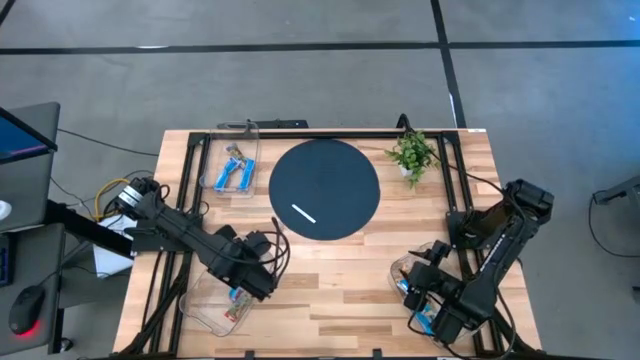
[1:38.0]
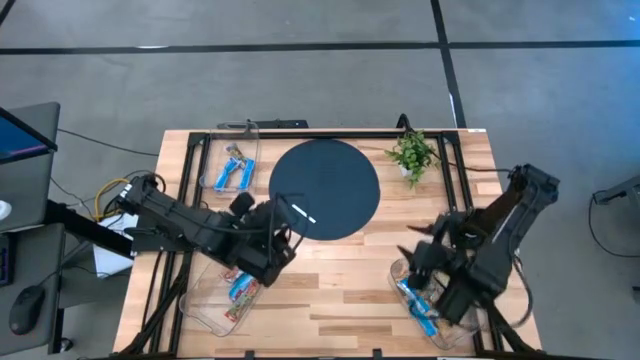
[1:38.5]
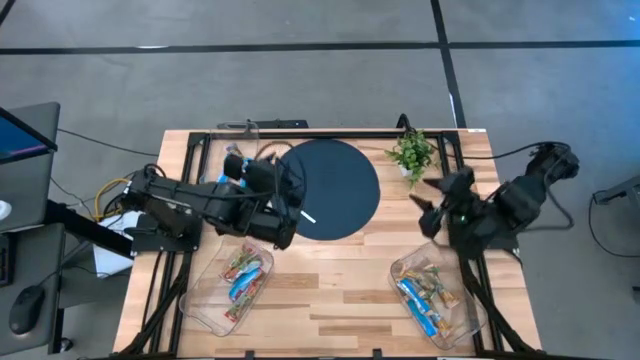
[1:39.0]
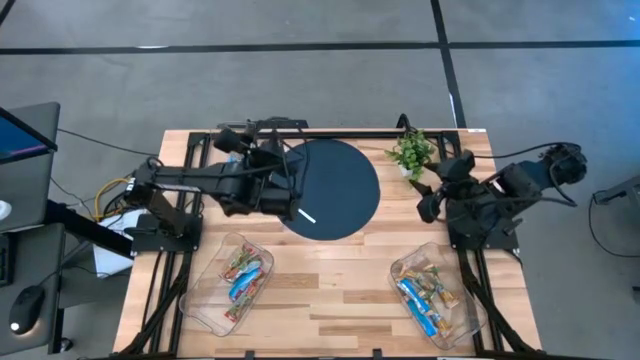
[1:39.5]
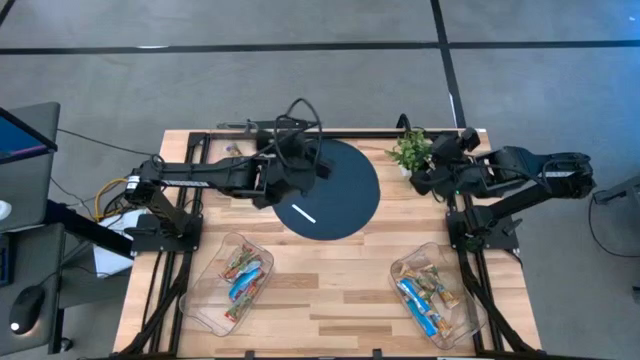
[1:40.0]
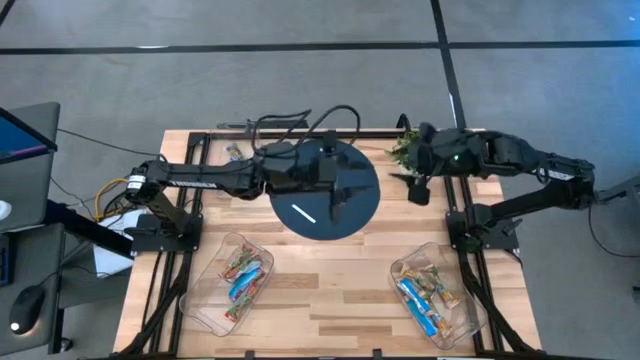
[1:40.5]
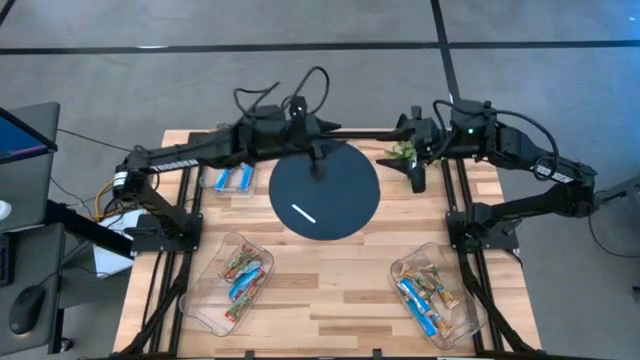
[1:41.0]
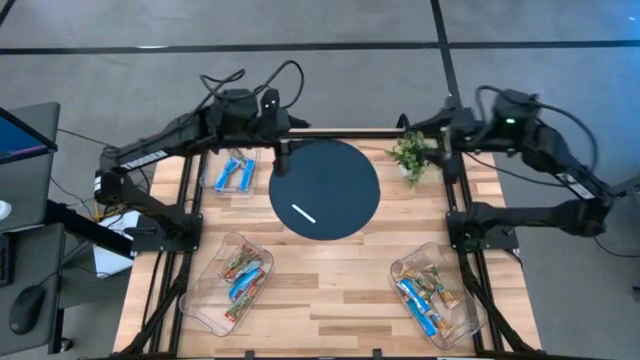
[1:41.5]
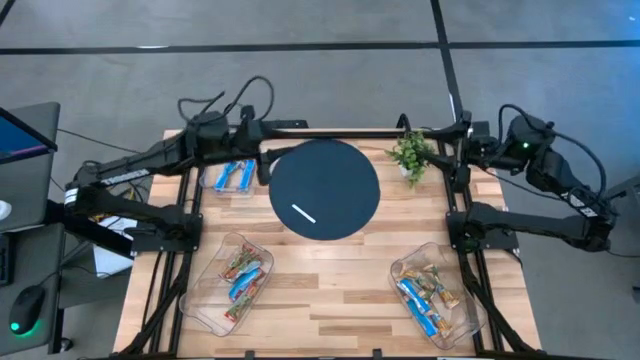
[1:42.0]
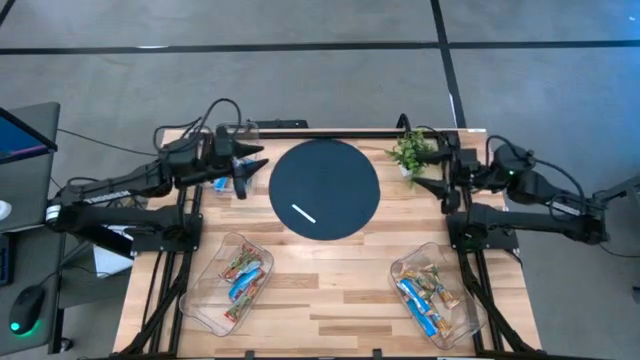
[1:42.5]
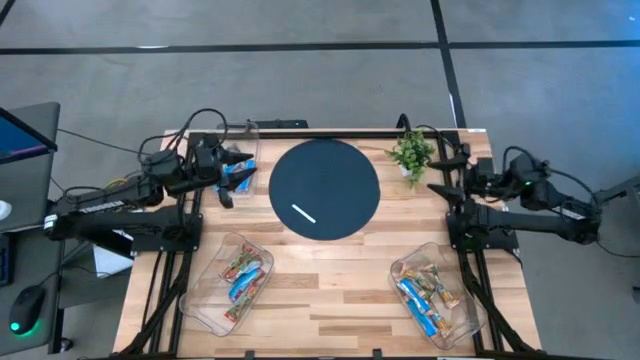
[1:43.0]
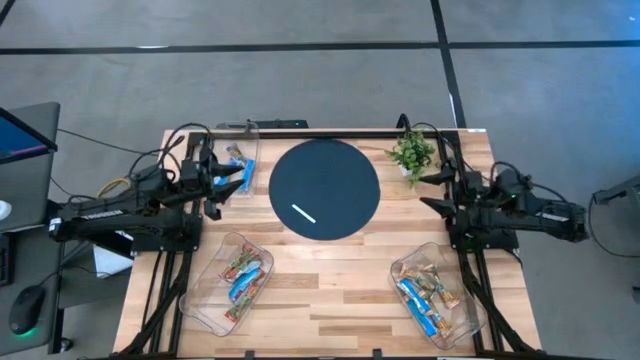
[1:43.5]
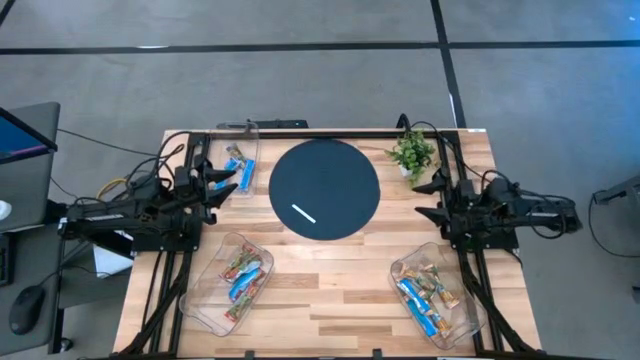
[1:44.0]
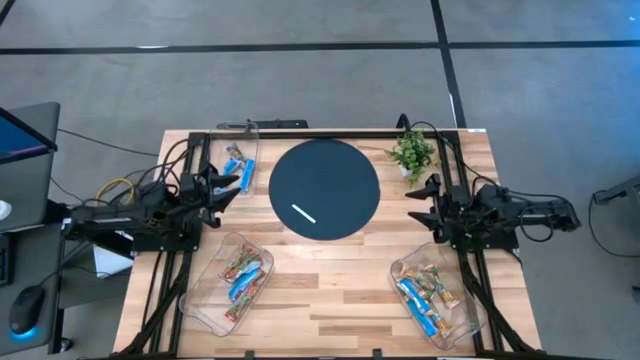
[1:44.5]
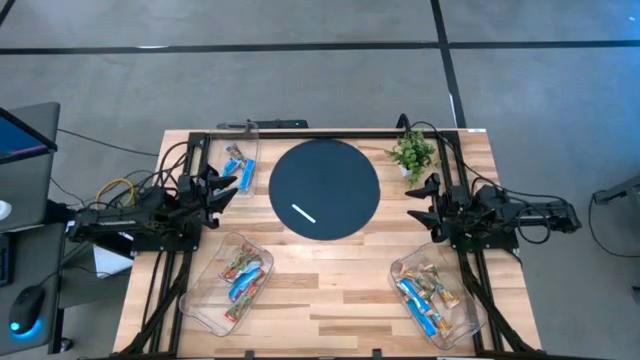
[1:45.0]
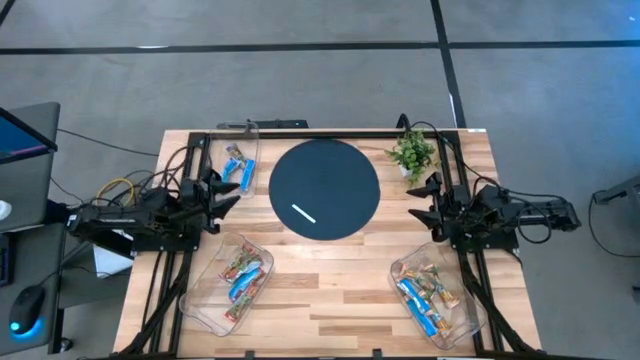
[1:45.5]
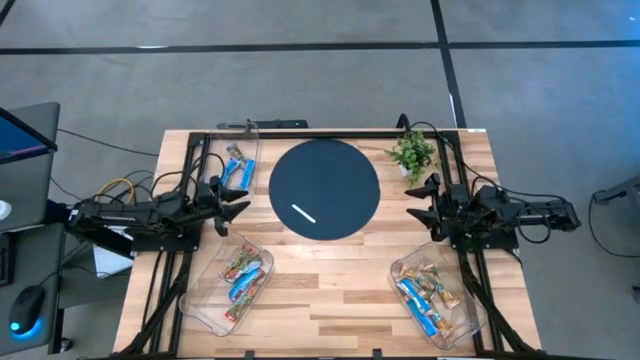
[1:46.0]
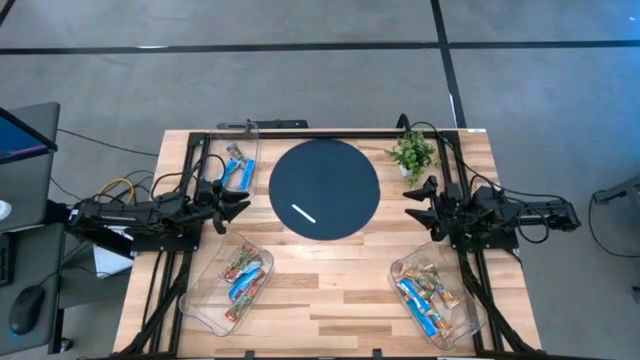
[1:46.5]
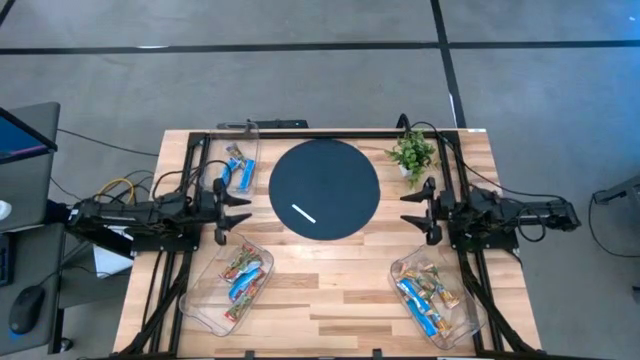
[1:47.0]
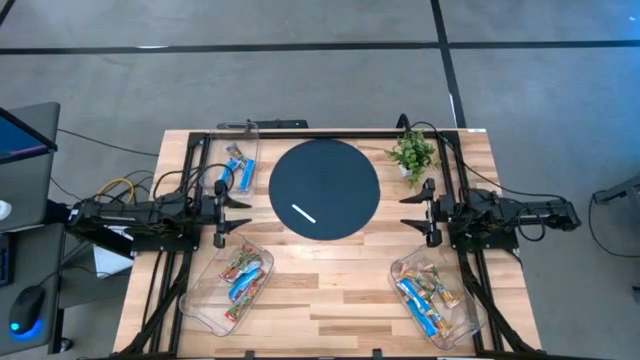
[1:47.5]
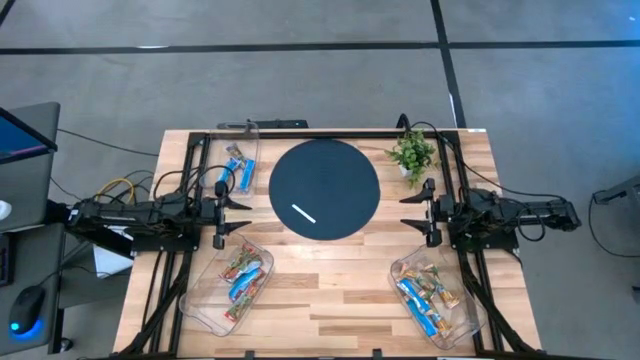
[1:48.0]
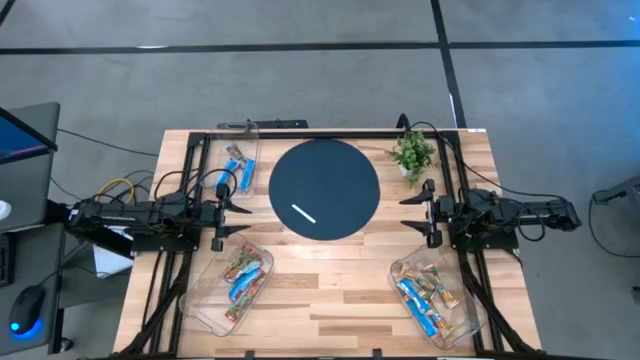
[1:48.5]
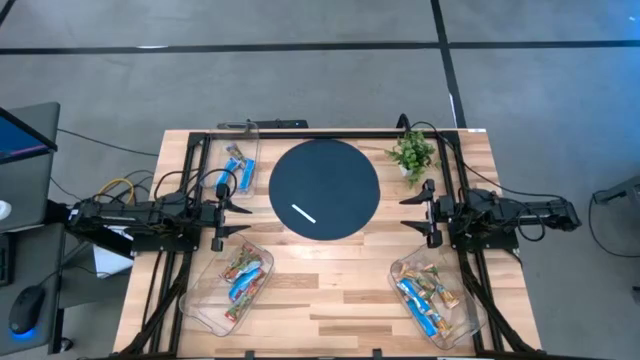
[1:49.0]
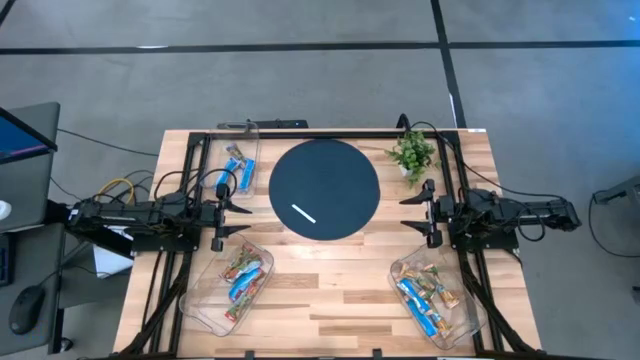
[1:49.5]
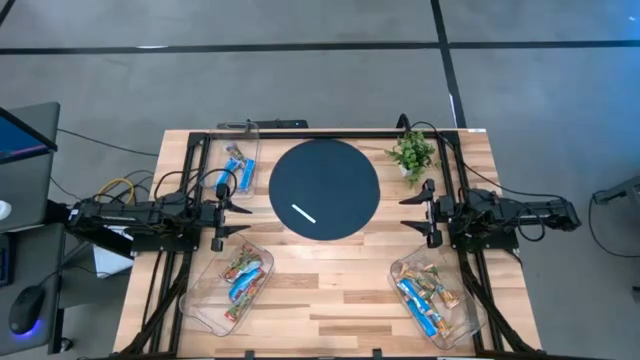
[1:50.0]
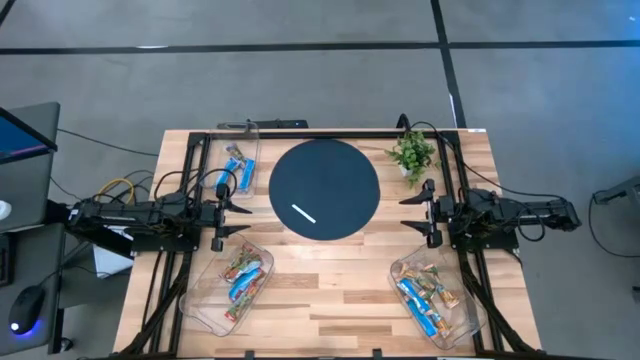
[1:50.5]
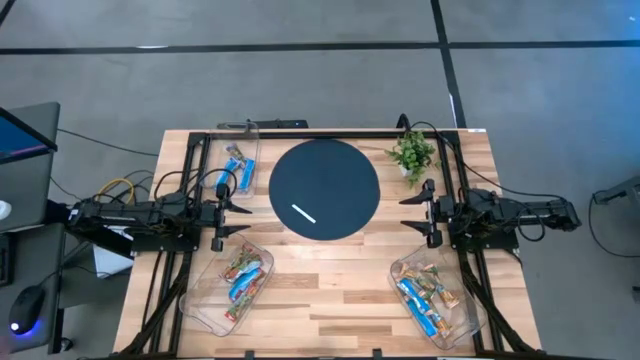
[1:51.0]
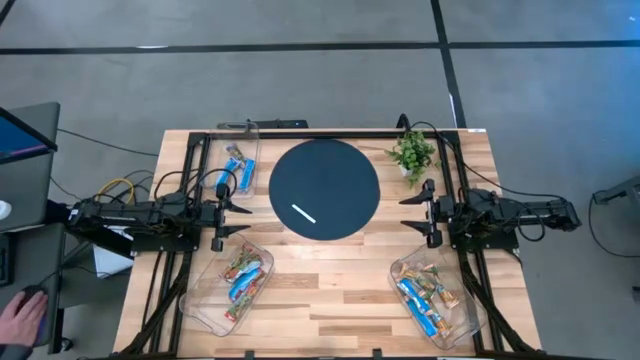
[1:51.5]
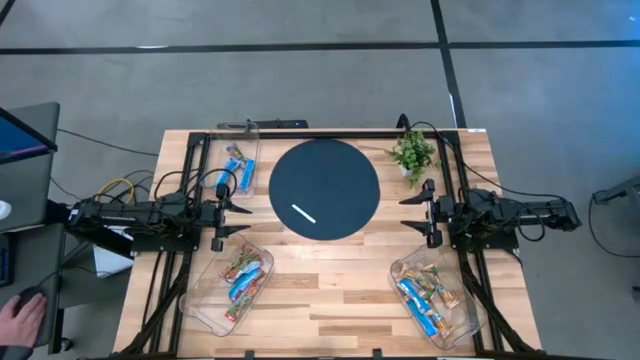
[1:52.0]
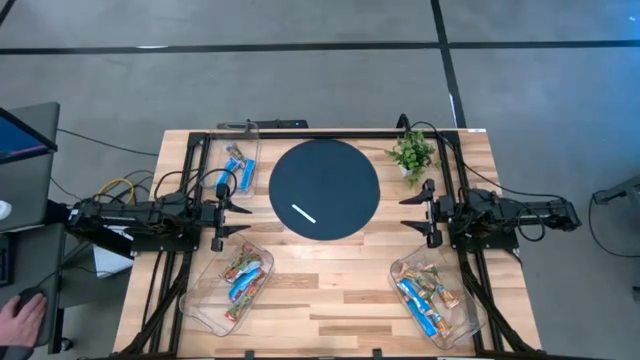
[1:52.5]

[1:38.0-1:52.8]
Task: Pick and place Granola Bars by type
Return to Home Position

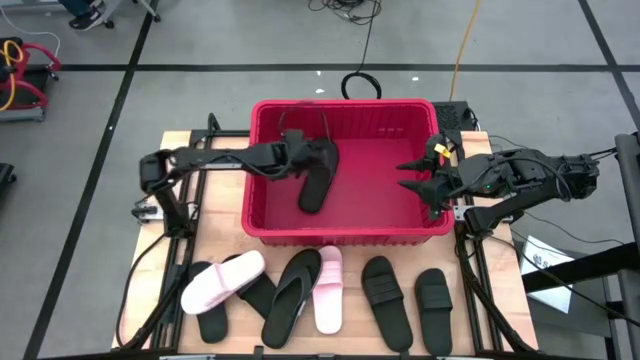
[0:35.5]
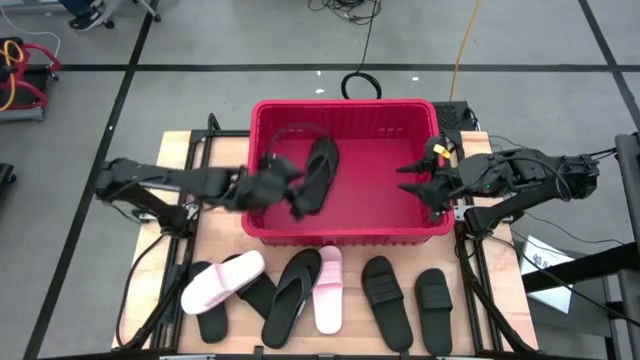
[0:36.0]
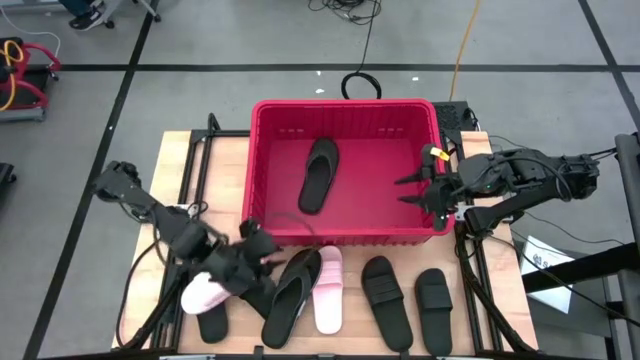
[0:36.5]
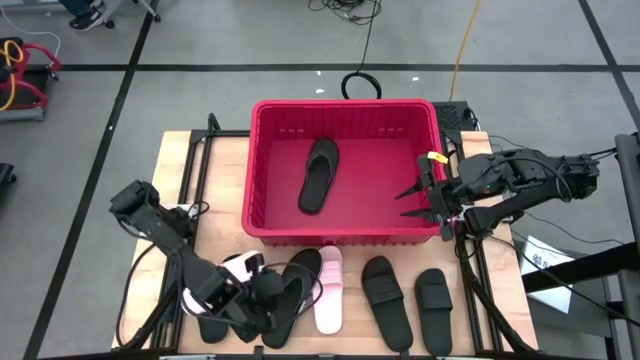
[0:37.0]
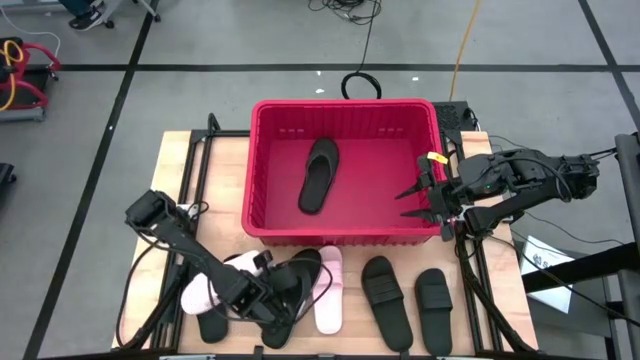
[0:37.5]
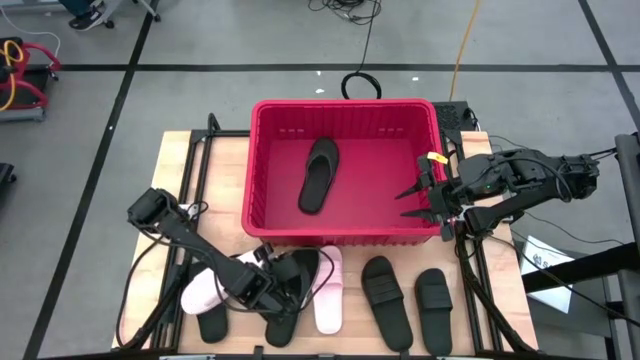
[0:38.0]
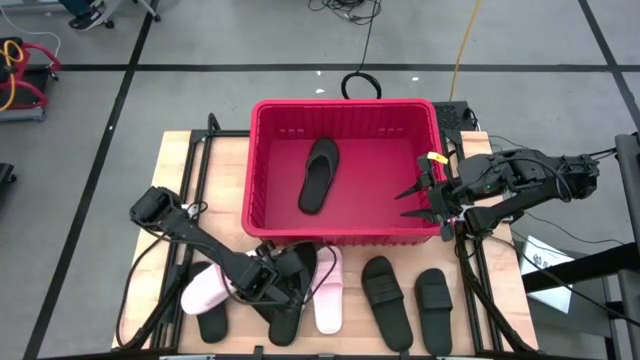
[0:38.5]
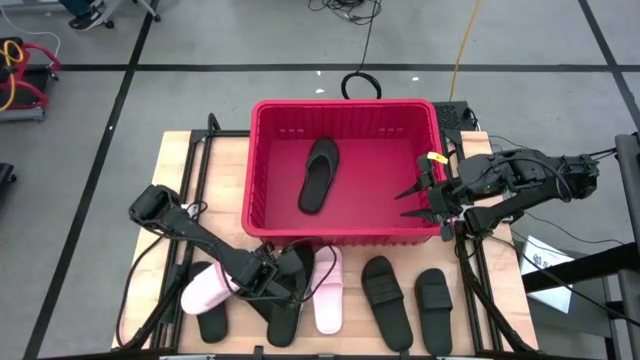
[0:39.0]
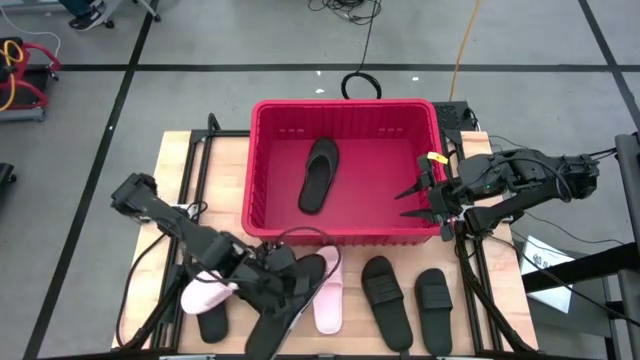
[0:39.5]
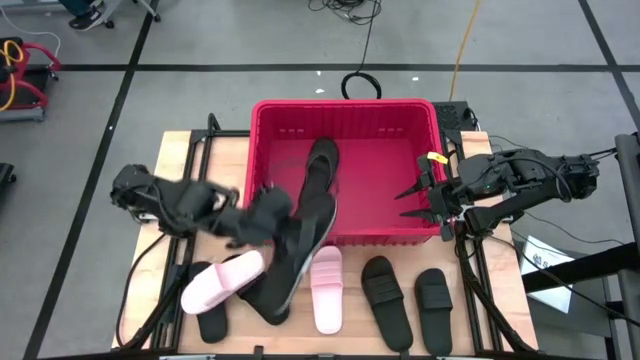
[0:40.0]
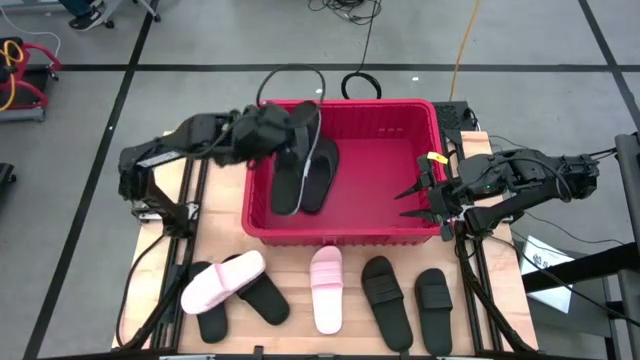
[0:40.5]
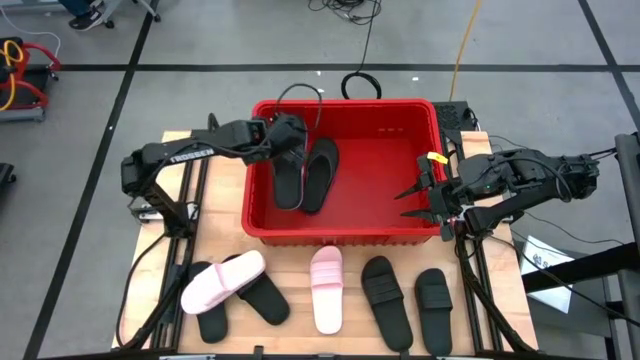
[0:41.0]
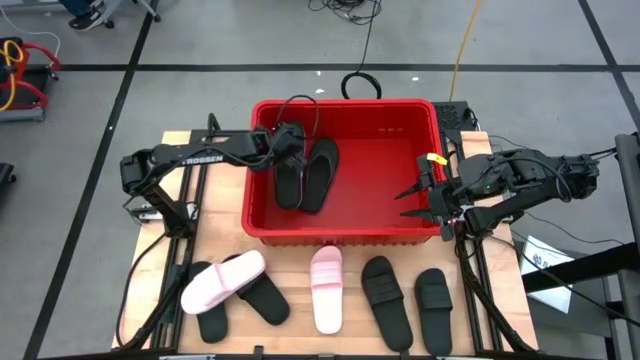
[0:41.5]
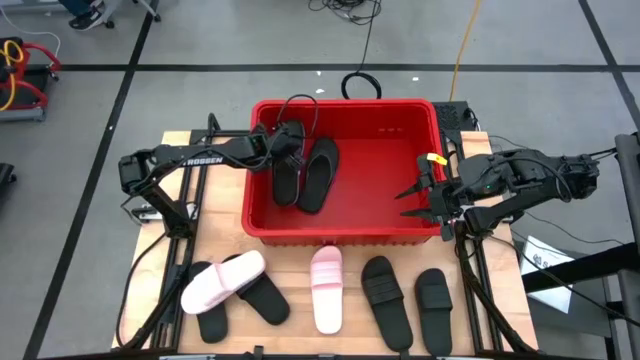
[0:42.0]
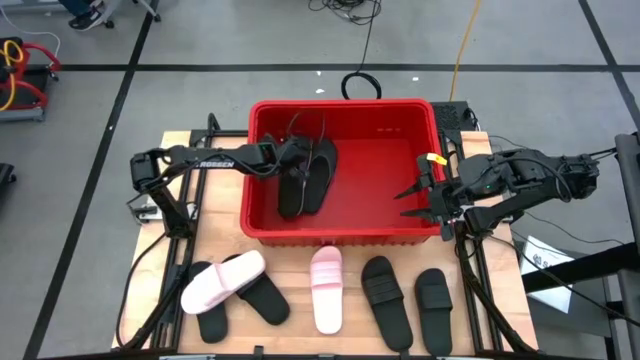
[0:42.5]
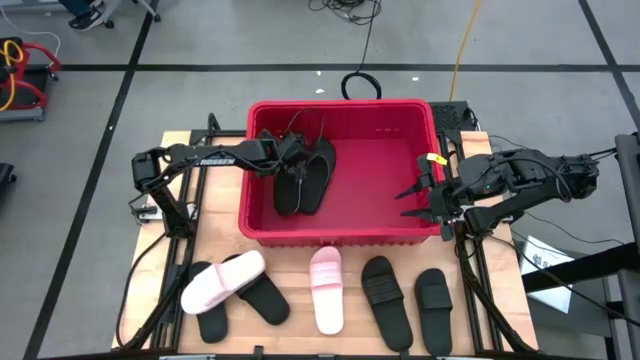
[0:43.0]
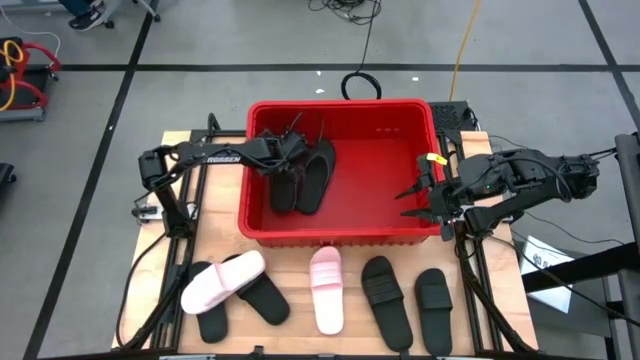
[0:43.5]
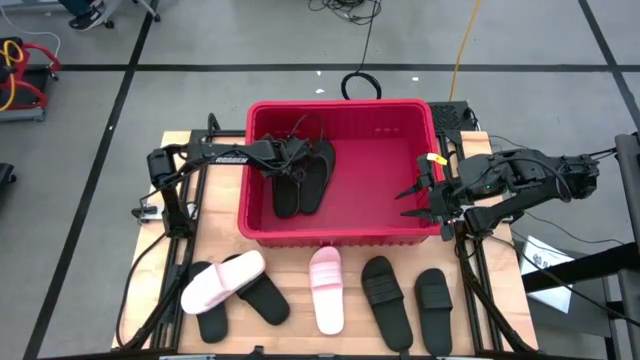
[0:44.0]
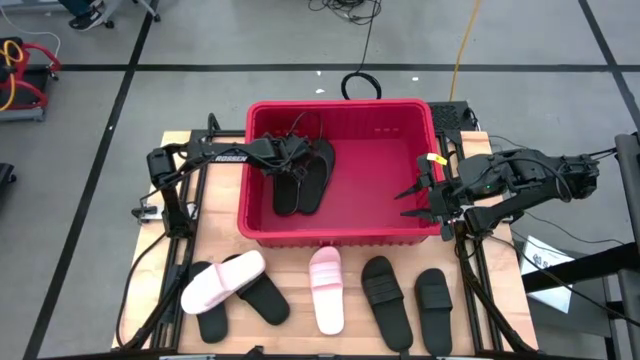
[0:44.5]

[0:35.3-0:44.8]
Task: Pick and place slides into bin
Put the black slipper into the red bin
